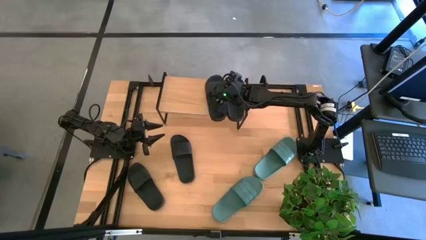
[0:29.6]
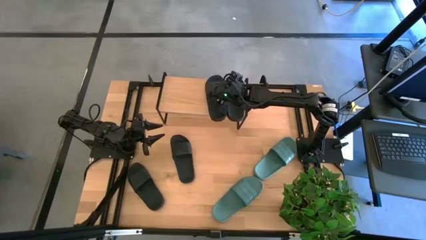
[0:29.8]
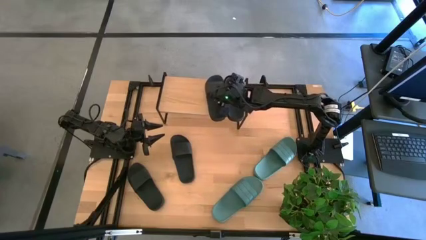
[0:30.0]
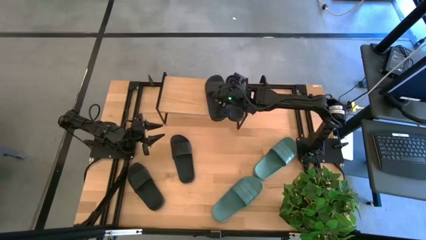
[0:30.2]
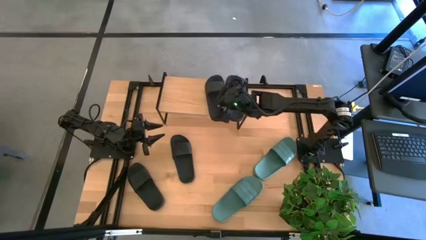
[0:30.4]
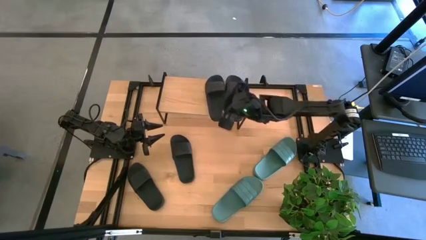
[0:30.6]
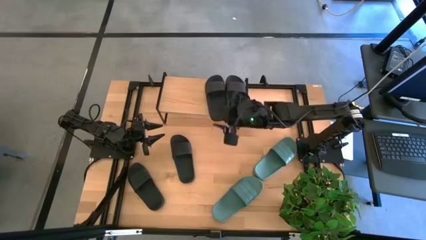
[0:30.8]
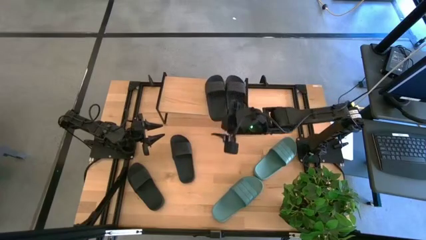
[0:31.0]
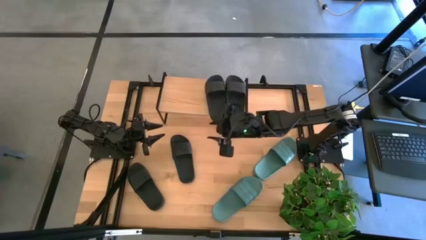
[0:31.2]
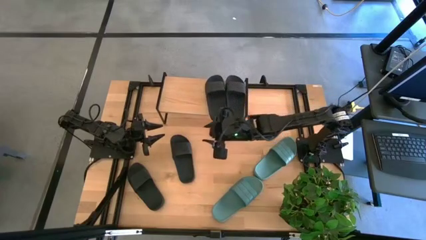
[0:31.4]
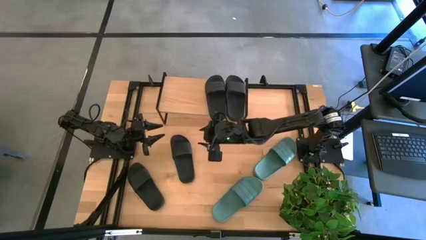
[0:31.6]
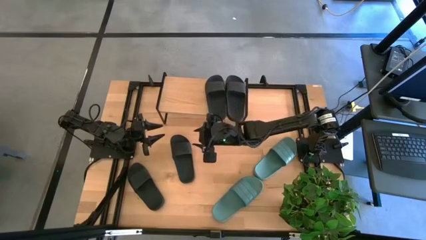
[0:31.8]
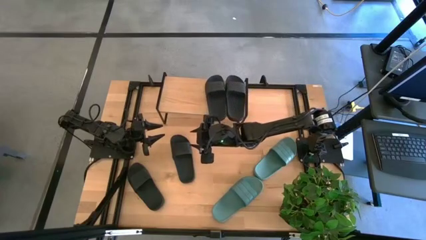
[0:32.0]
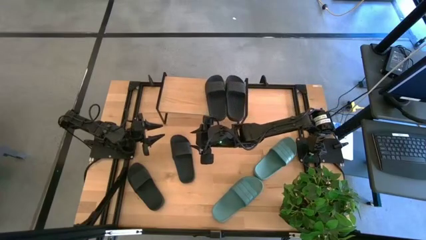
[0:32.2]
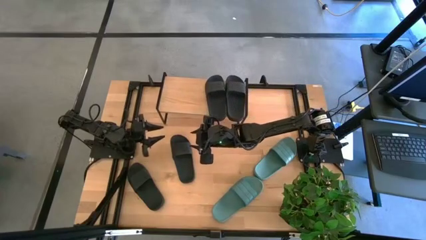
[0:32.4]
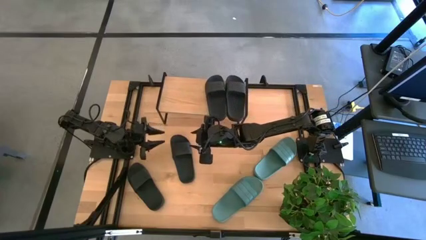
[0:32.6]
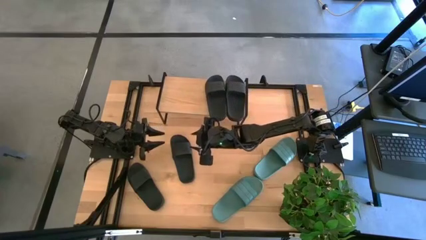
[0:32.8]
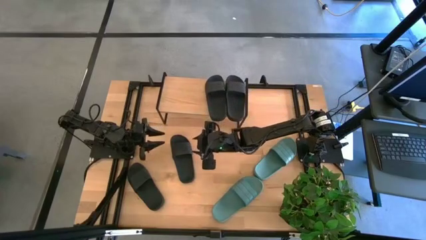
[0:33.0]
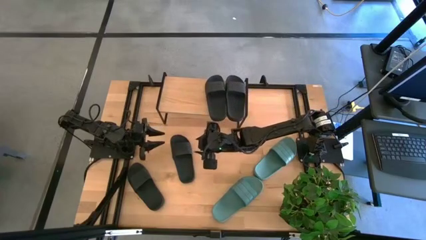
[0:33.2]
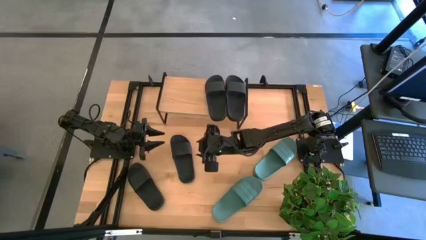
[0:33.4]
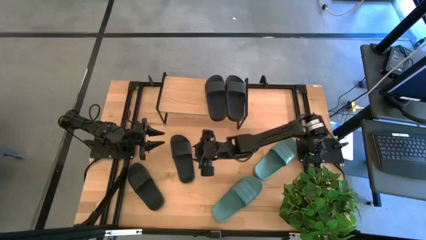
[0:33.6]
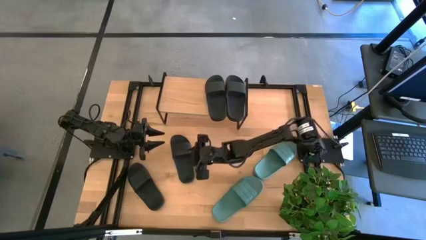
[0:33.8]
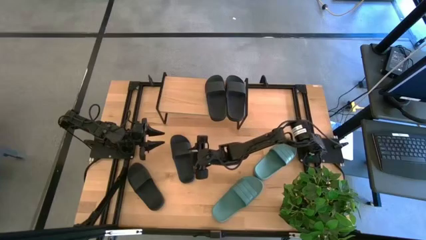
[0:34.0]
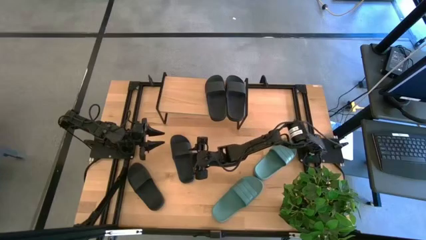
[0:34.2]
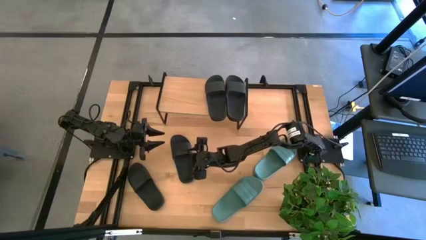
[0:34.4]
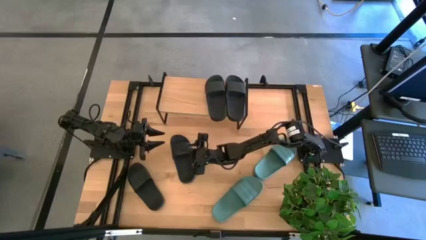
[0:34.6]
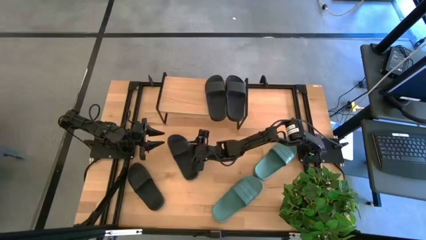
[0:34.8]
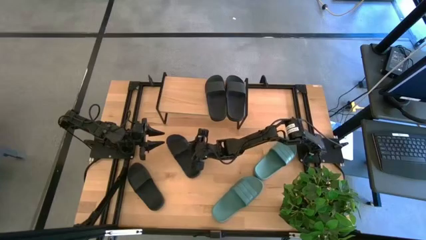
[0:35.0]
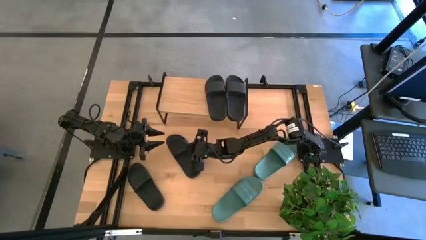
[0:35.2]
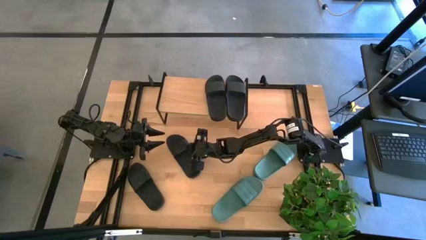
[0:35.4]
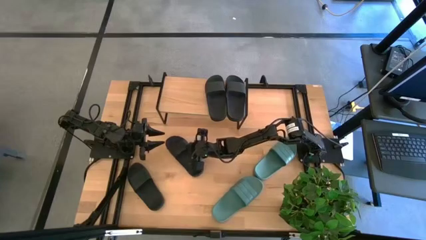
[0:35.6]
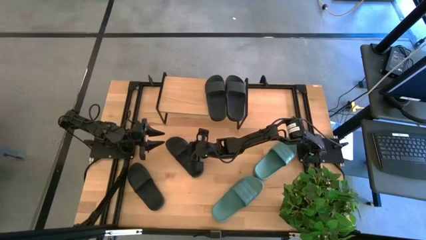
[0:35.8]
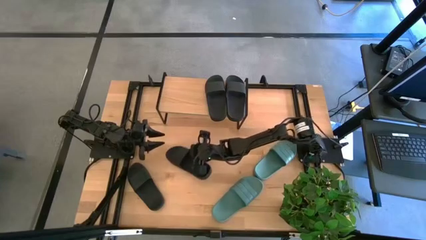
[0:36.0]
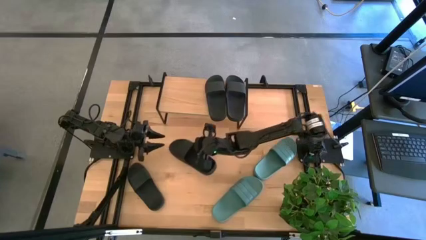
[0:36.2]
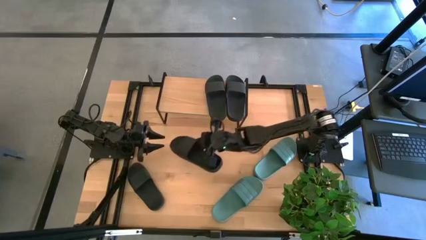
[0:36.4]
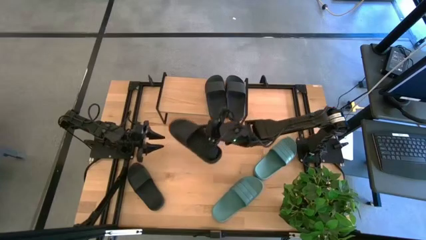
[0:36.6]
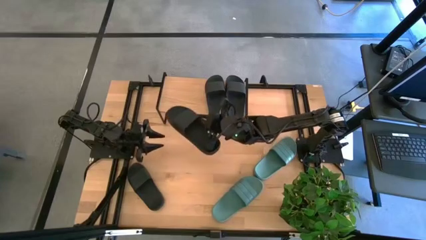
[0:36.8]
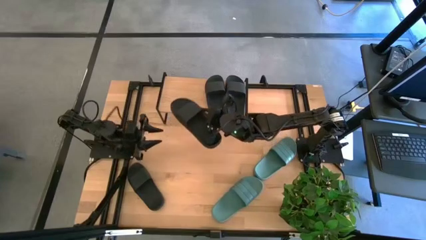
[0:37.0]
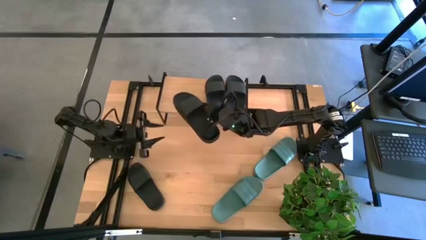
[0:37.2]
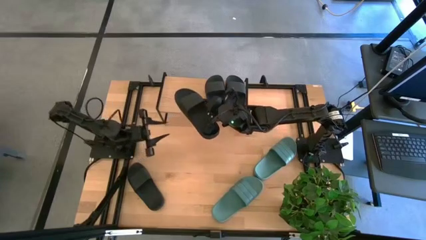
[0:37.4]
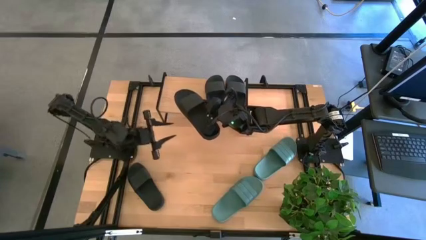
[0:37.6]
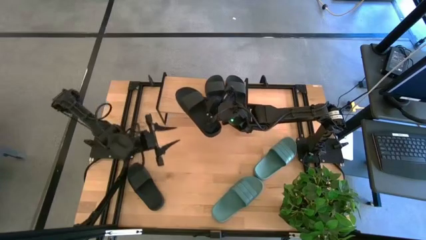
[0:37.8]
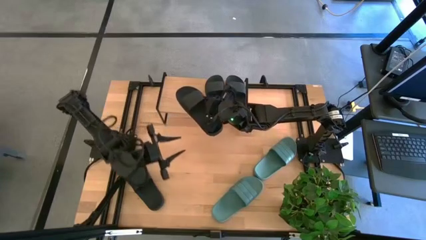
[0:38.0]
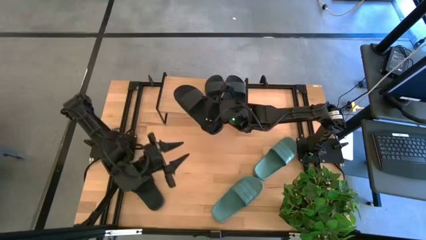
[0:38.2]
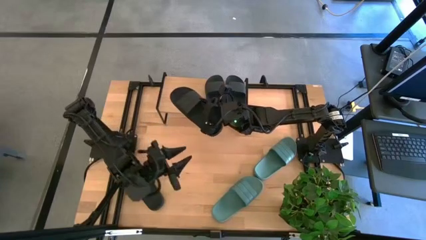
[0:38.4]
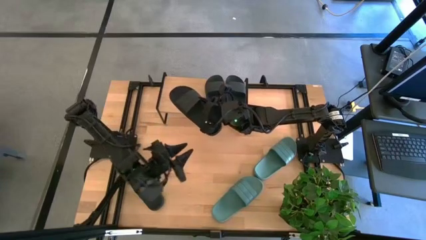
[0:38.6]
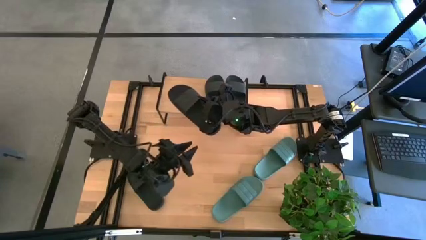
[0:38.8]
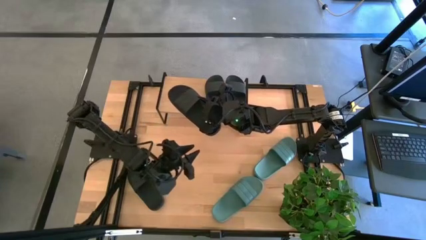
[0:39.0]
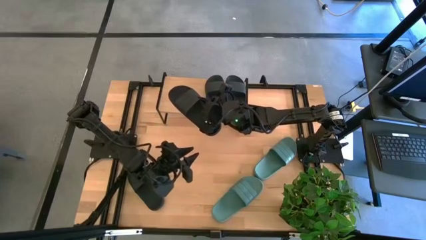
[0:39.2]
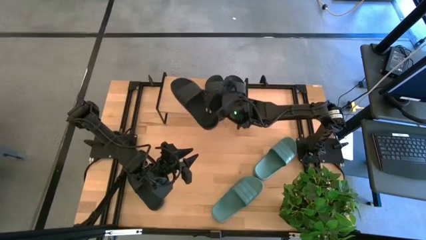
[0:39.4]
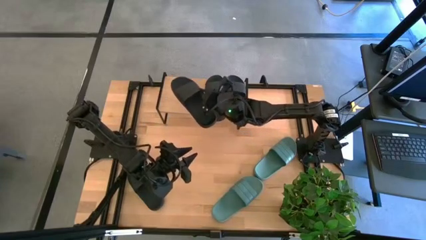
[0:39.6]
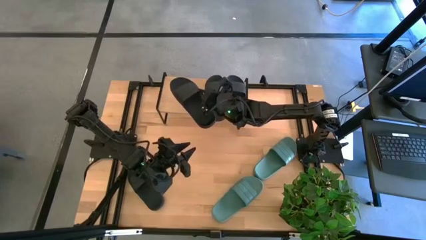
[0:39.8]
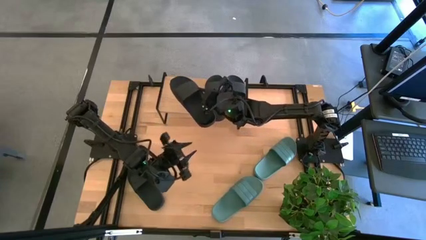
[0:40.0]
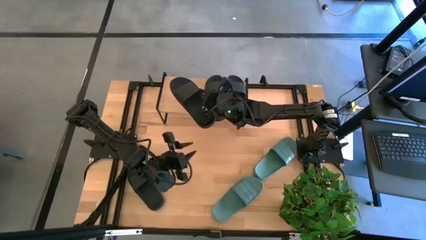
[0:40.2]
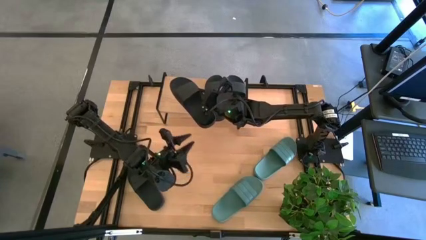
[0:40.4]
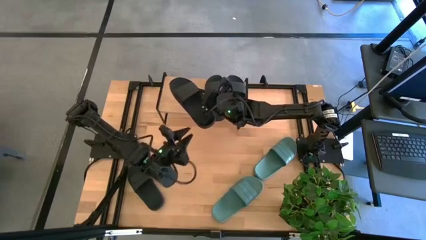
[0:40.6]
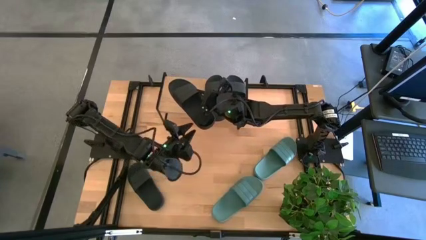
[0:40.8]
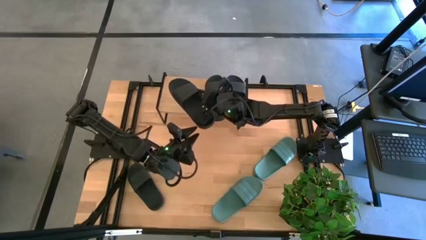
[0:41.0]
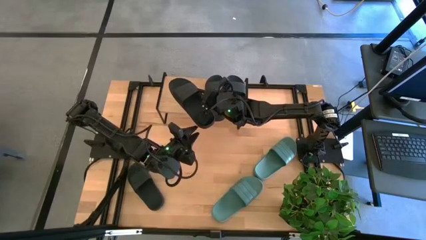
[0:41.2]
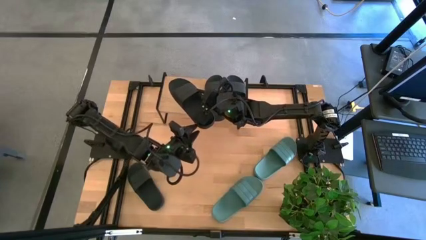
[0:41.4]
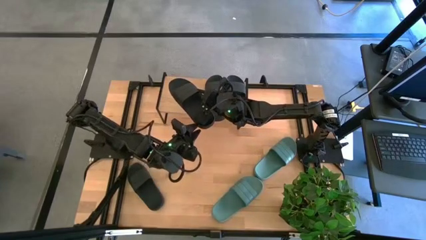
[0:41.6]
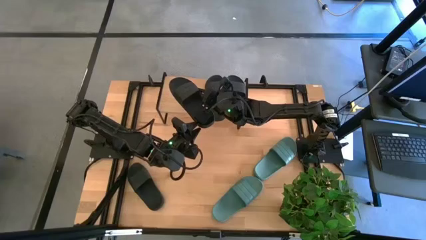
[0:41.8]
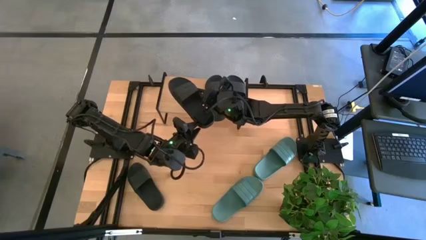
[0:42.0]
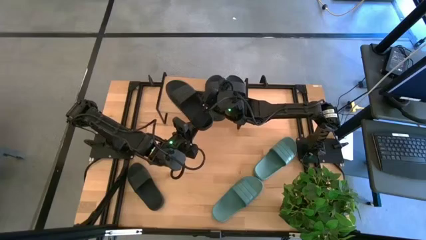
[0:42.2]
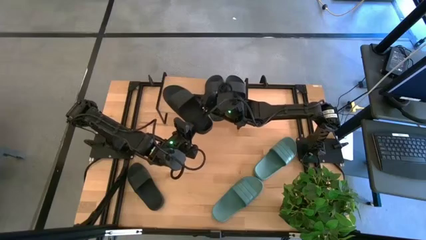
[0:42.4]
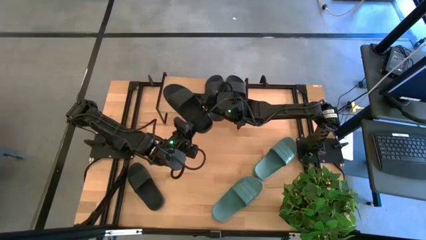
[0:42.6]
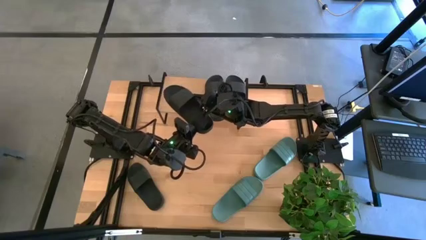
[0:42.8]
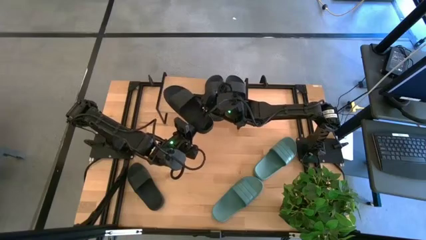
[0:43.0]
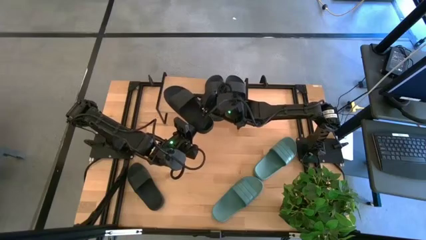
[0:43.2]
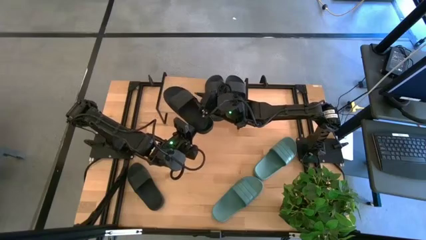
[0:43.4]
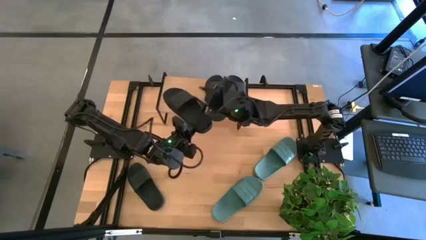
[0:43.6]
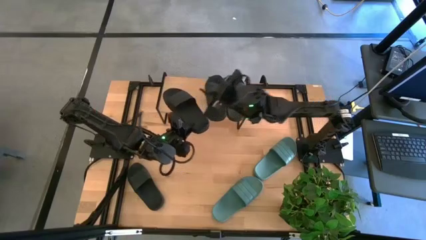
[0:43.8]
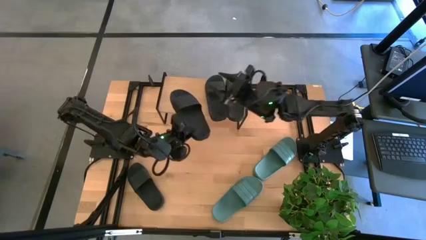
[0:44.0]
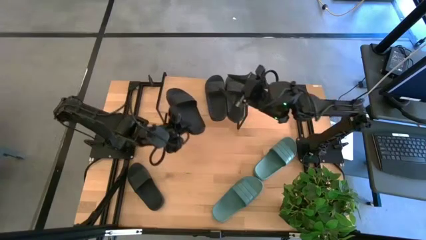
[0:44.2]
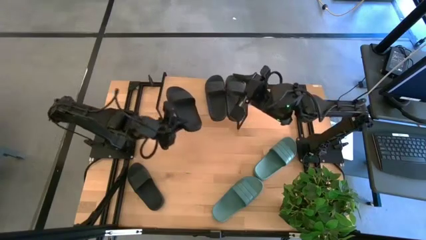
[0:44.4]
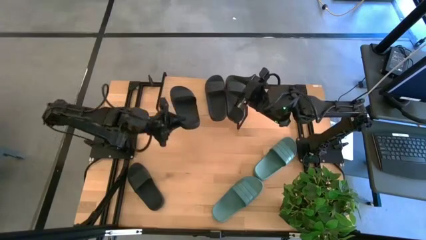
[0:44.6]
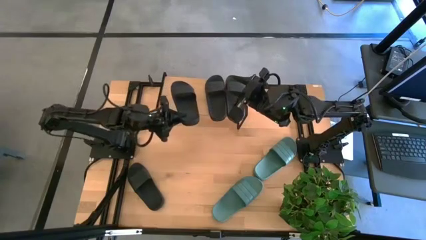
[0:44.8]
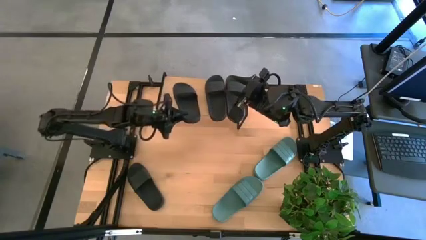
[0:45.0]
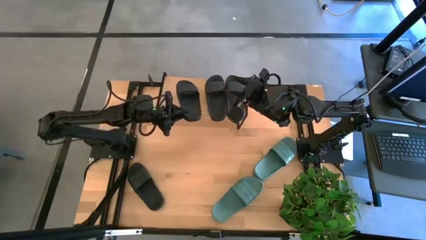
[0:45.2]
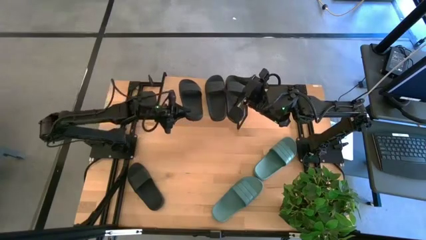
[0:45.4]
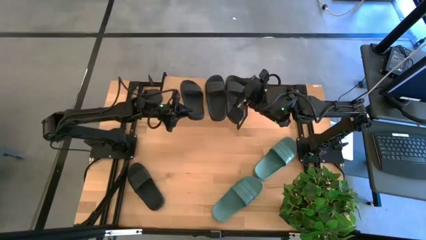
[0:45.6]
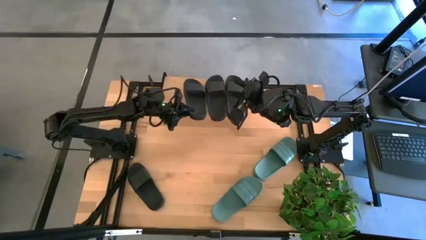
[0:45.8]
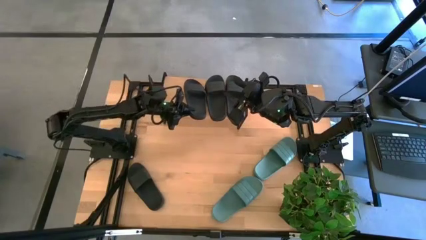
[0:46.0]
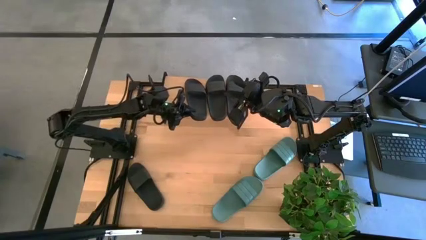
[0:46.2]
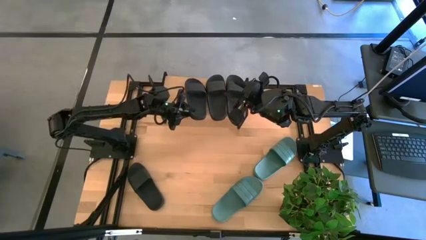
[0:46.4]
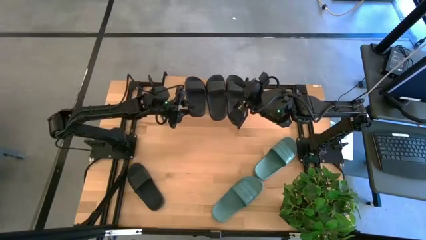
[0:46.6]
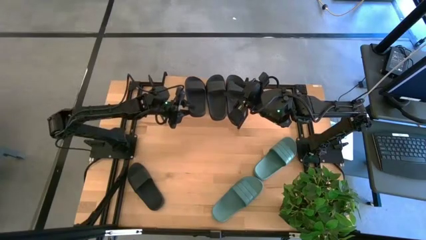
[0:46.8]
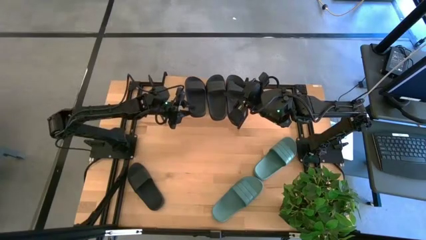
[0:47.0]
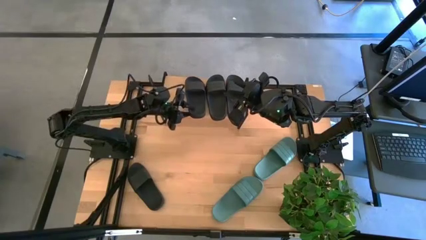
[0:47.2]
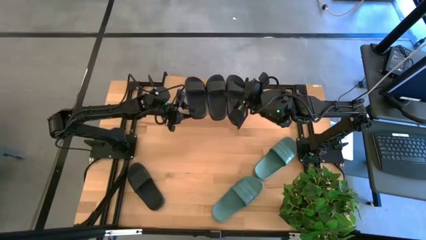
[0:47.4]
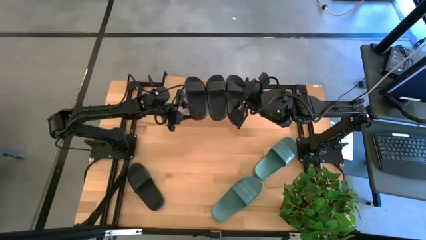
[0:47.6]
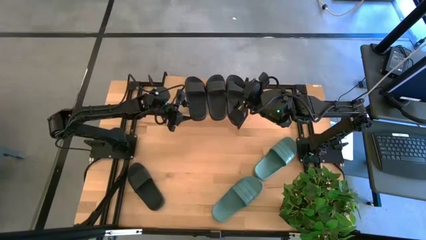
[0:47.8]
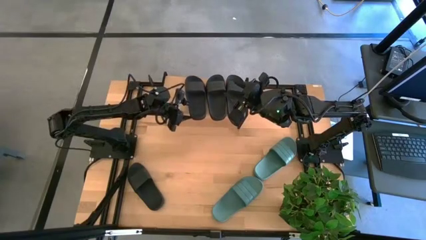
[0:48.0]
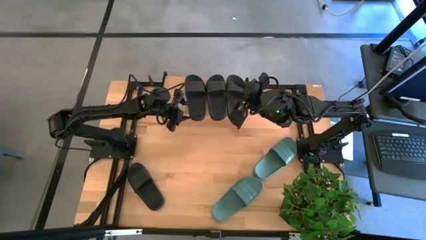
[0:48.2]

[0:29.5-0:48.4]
Task: Pick and place slides into the shelf
Put the black slide on the shelf
